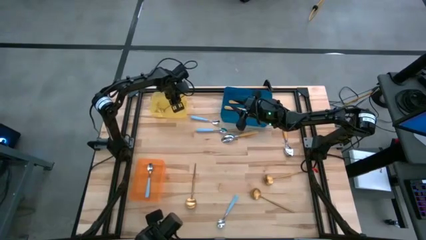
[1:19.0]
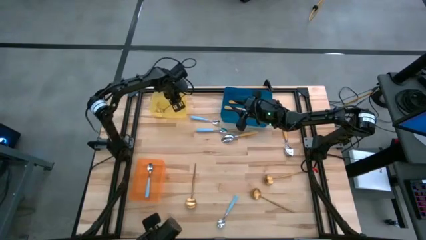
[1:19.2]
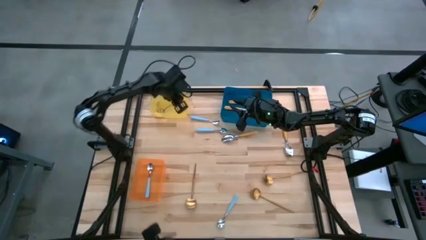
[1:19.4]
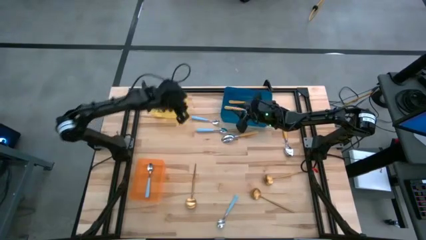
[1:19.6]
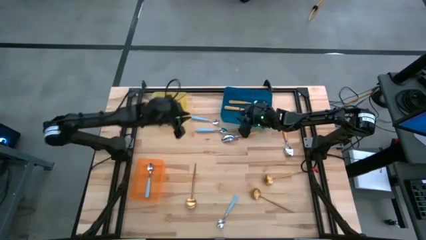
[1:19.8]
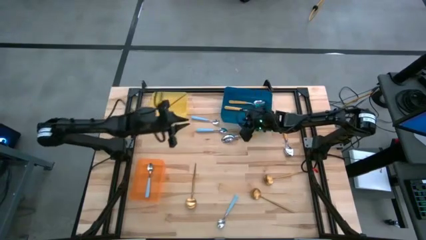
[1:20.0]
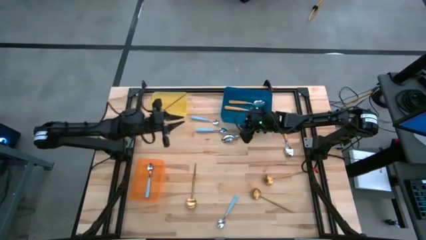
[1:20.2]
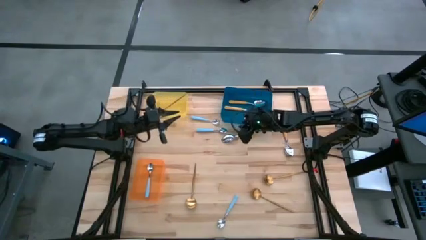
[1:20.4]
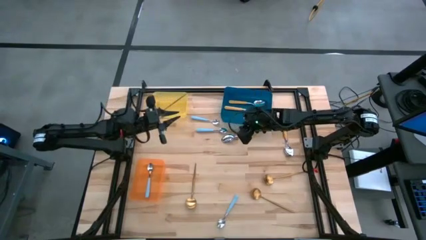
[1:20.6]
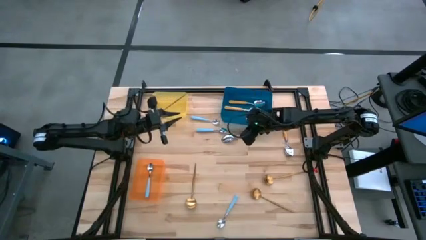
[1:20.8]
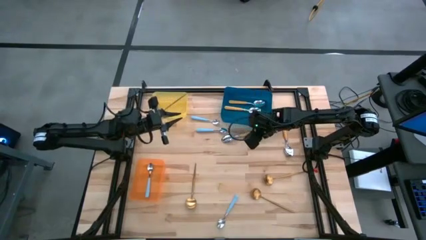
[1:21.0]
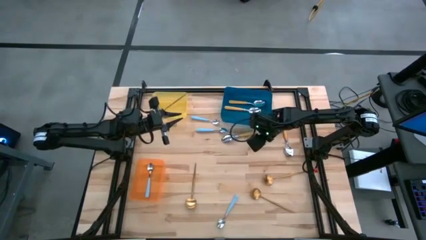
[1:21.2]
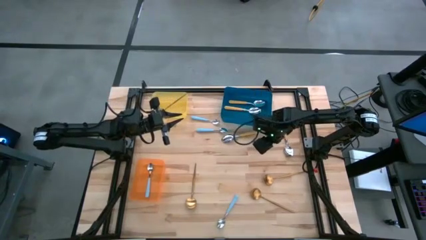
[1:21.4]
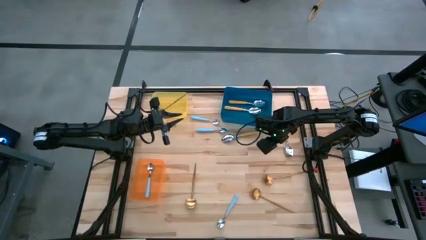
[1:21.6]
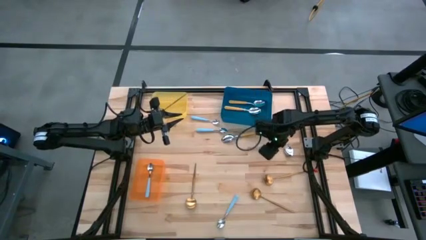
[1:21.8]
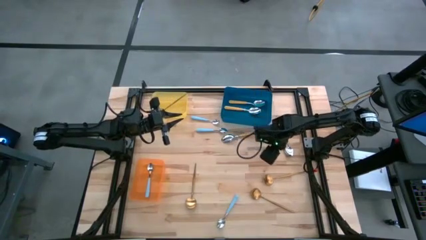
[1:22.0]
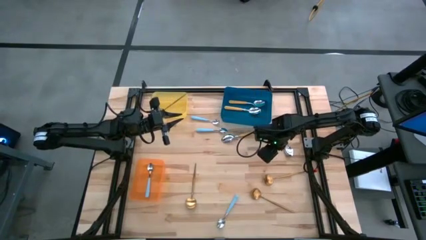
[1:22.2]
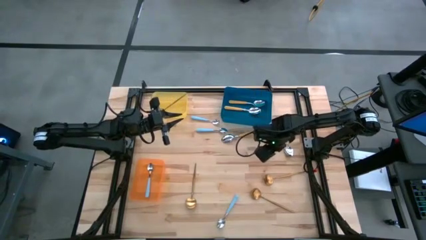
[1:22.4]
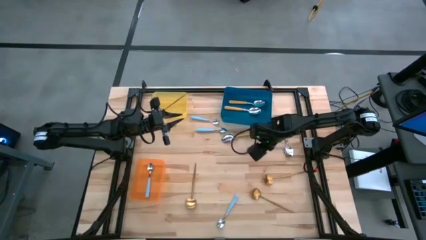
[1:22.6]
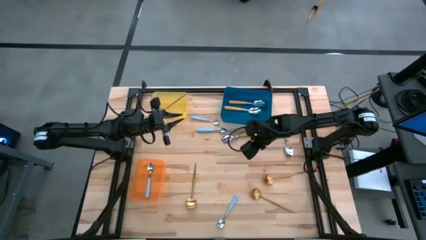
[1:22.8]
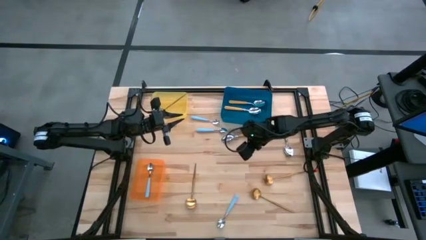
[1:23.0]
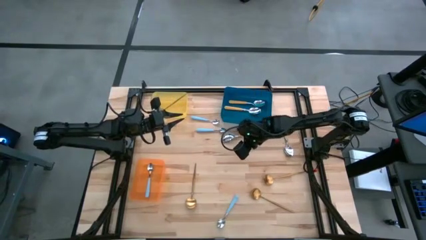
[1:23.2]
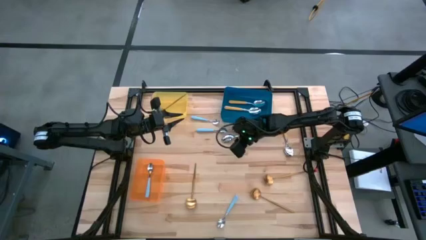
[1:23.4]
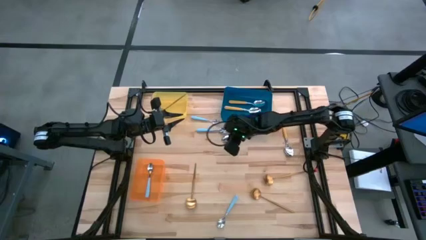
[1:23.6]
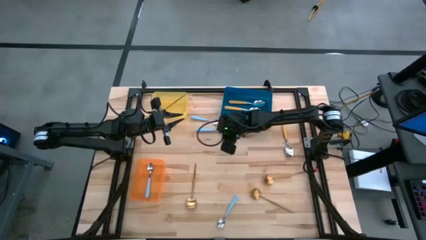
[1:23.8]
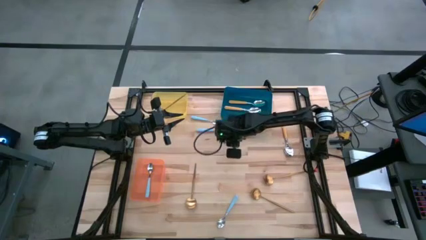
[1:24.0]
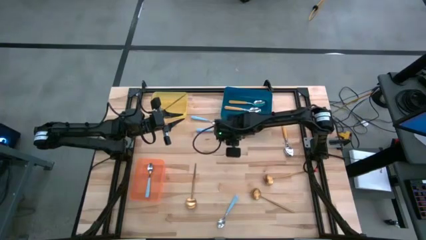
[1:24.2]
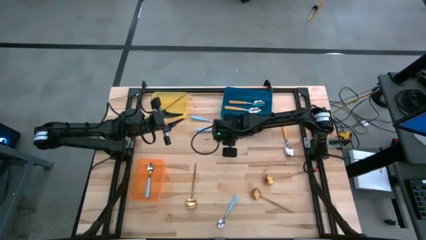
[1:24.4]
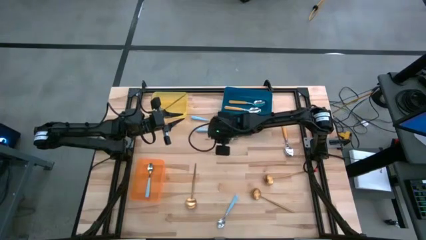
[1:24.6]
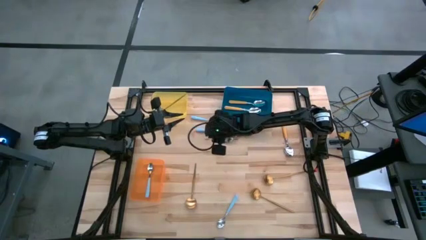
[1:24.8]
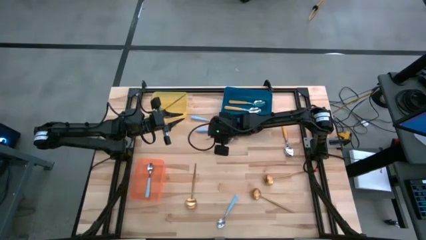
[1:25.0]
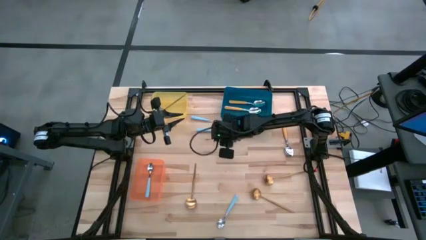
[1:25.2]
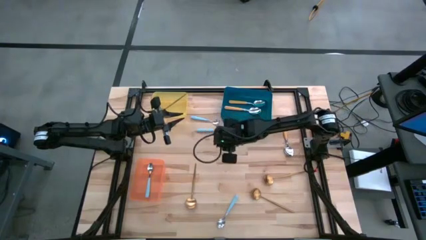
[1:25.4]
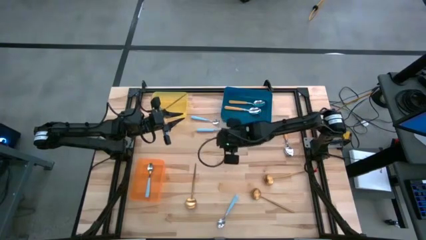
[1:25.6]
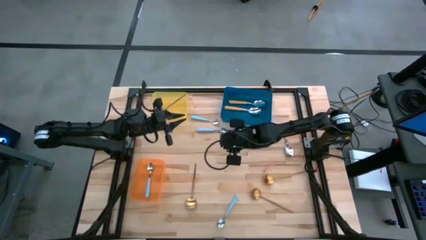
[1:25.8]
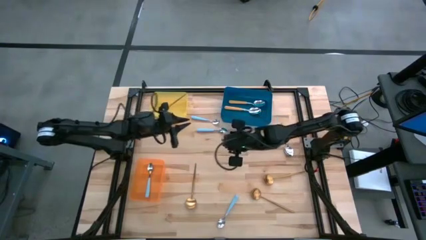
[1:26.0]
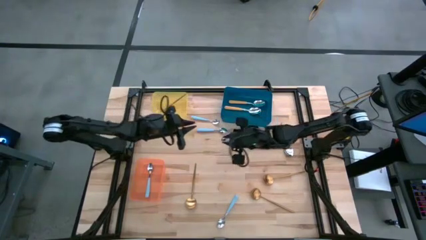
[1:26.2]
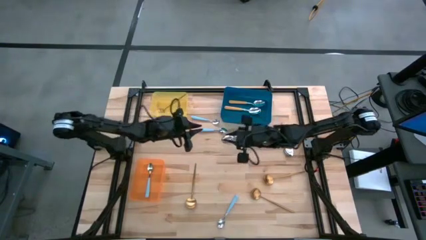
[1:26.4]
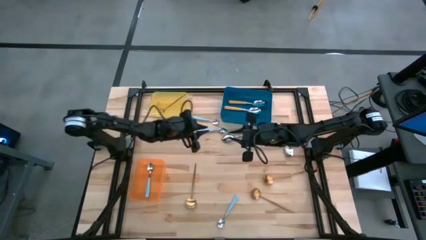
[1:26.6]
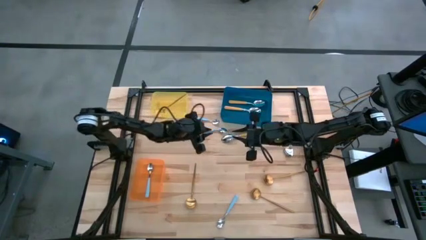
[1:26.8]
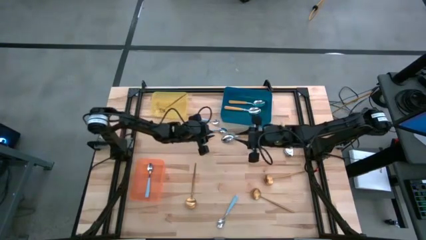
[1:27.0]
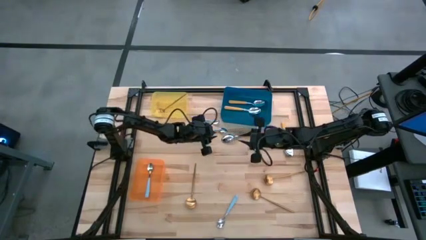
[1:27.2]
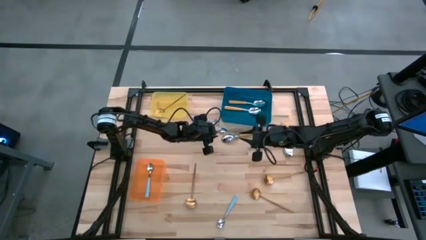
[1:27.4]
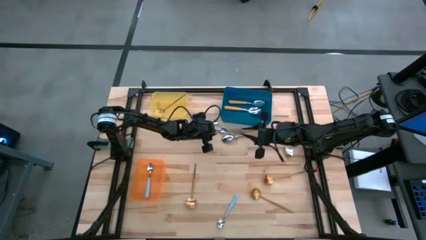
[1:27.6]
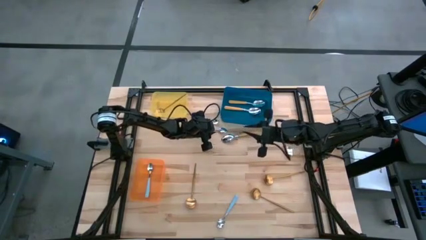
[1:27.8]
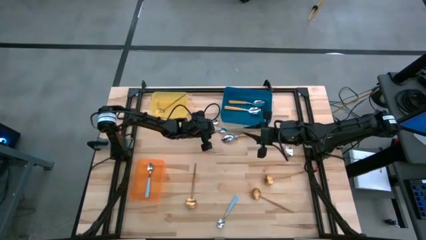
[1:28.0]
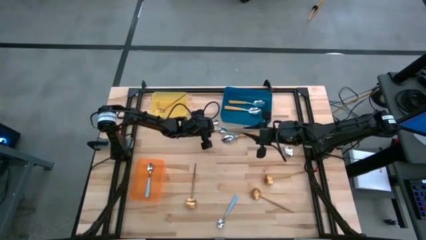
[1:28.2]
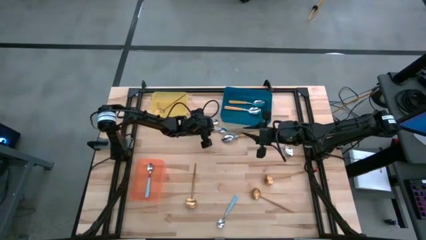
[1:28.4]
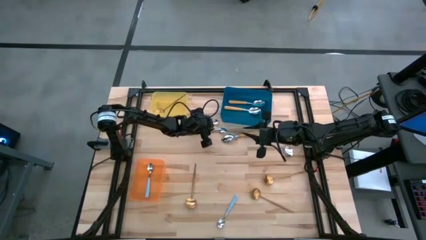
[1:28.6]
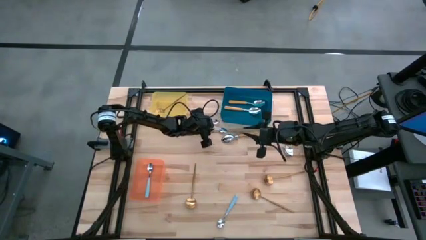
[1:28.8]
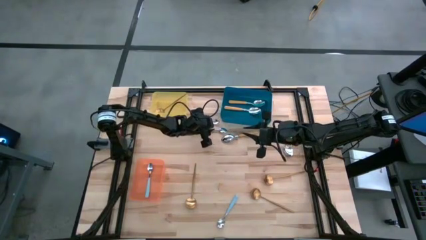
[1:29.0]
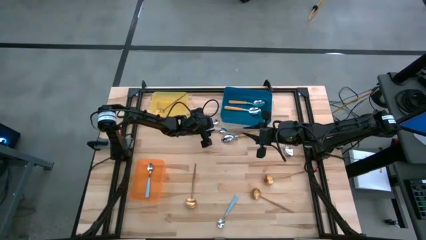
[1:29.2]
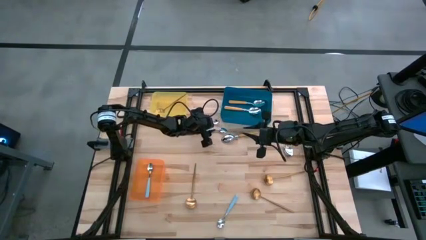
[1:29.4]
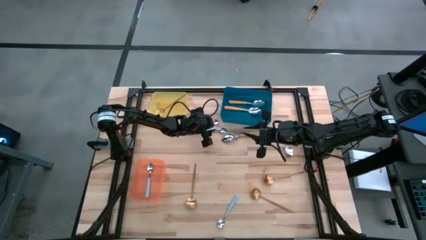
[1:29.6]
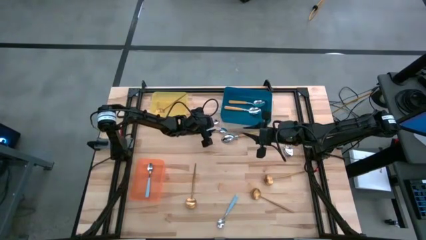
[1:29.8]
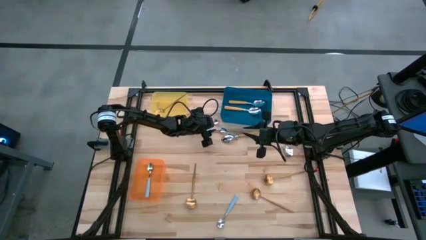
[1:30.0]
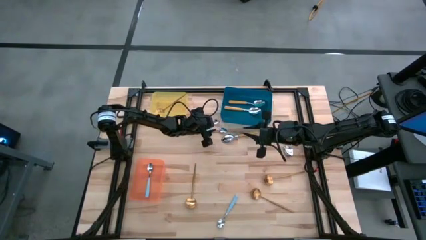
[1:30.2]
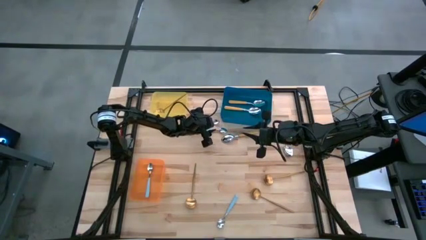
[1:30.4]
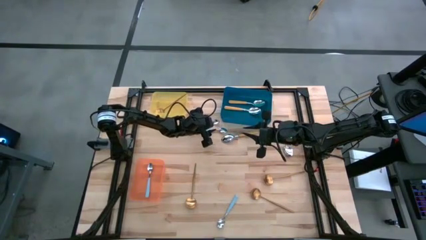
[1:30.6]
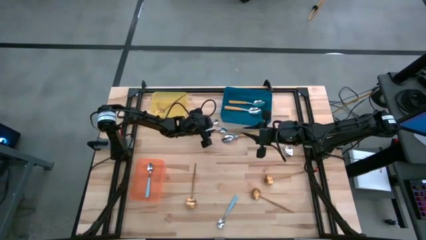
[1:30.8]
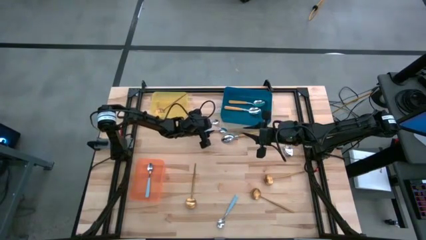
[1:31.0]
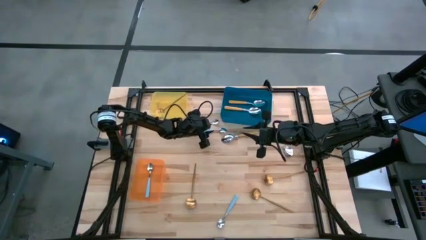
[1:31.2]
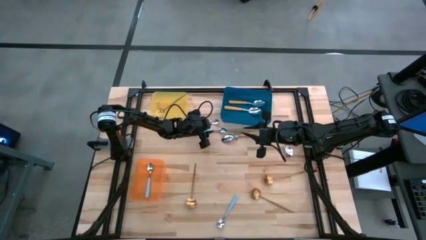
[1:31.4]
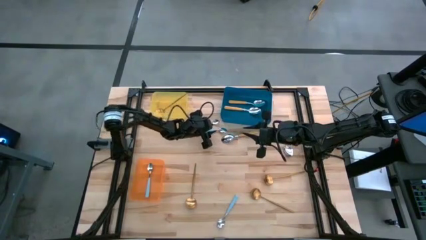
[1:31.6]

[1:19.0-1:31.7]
Task: Sort silverware by color (type)
Put the blue spoon into the orange bin

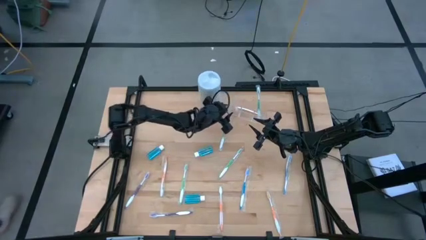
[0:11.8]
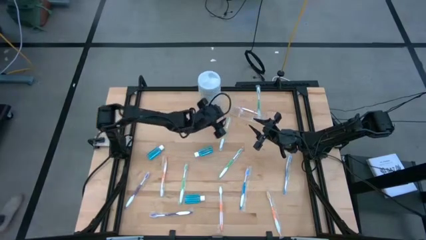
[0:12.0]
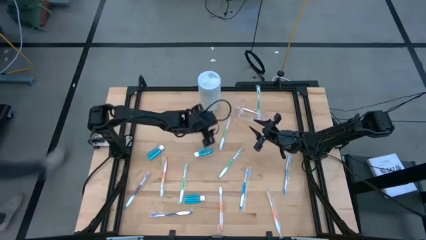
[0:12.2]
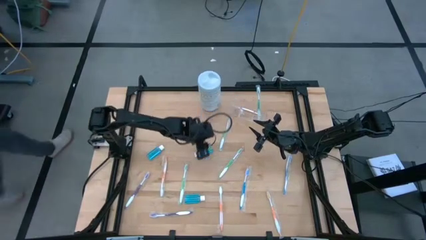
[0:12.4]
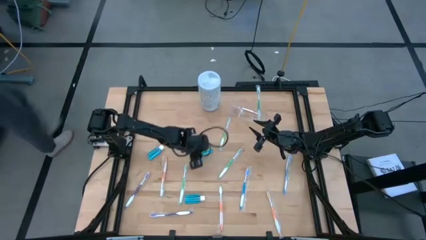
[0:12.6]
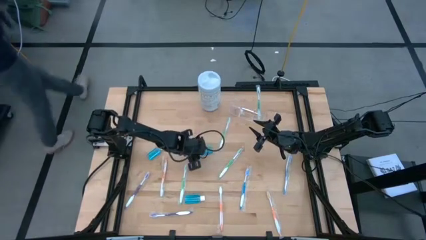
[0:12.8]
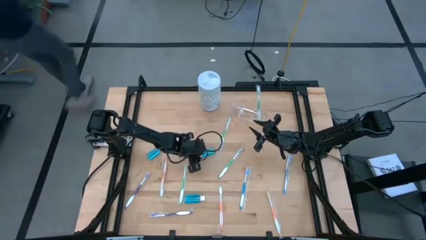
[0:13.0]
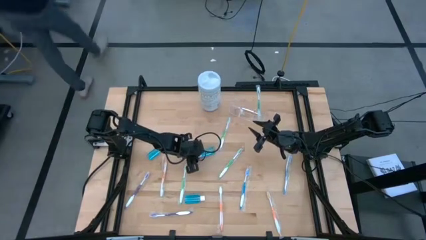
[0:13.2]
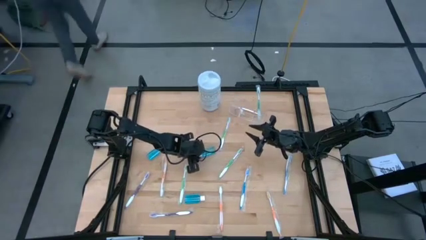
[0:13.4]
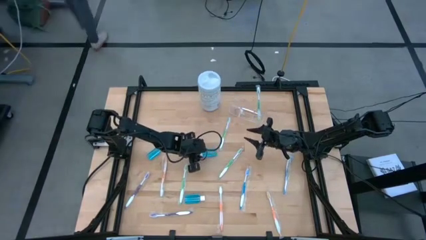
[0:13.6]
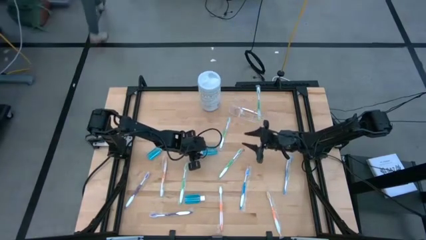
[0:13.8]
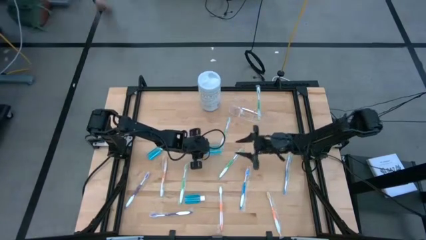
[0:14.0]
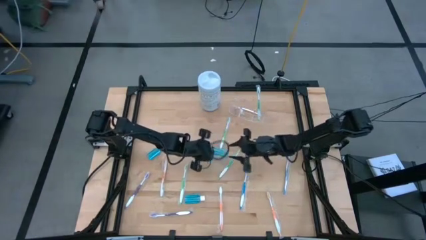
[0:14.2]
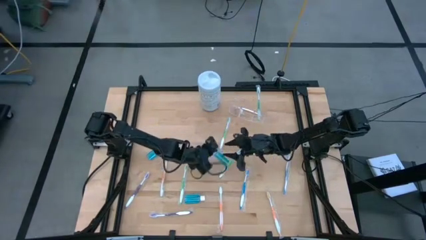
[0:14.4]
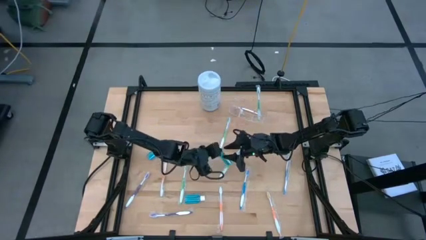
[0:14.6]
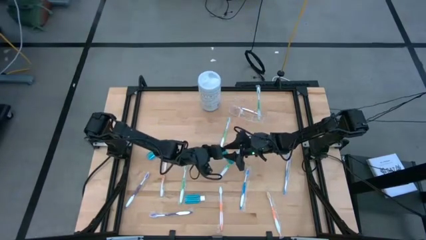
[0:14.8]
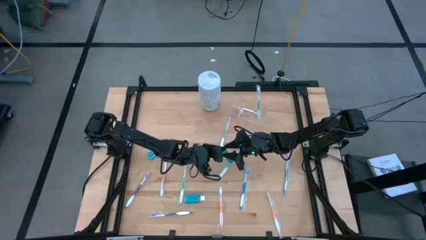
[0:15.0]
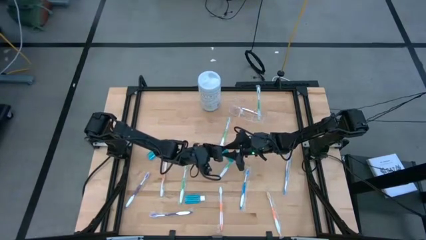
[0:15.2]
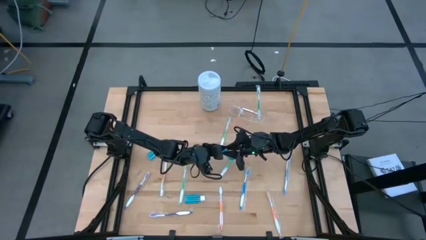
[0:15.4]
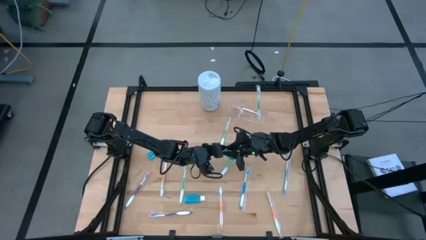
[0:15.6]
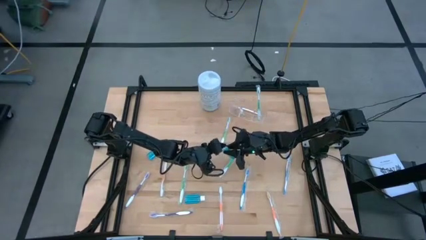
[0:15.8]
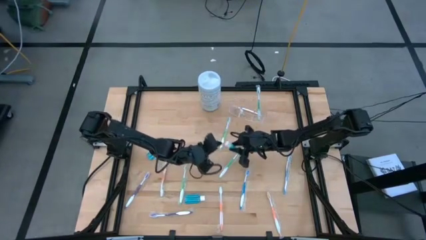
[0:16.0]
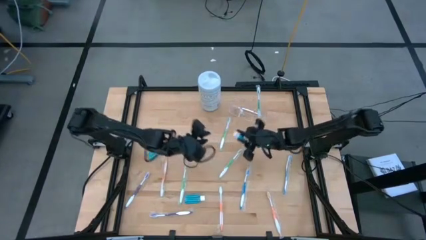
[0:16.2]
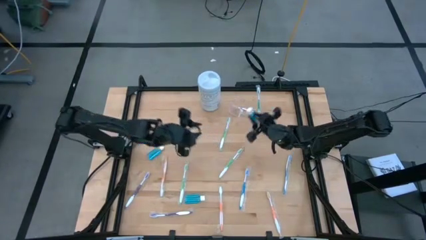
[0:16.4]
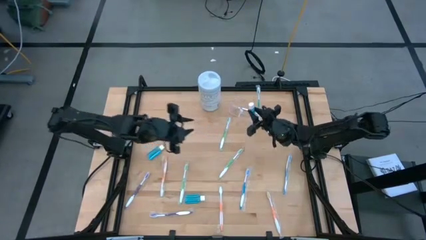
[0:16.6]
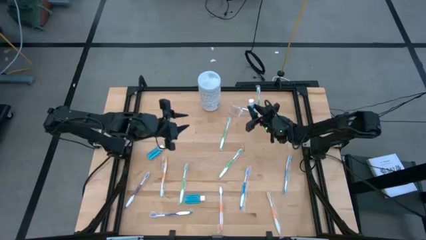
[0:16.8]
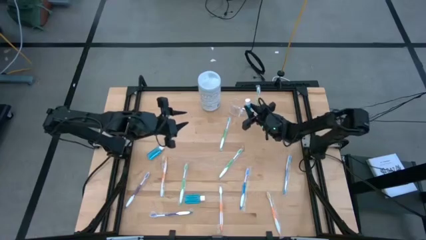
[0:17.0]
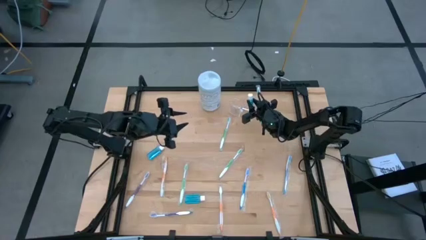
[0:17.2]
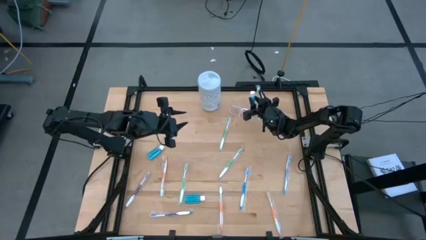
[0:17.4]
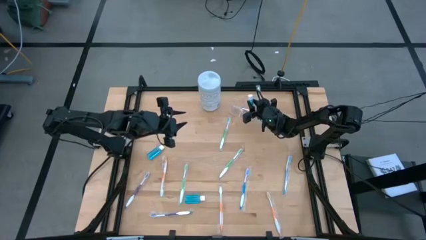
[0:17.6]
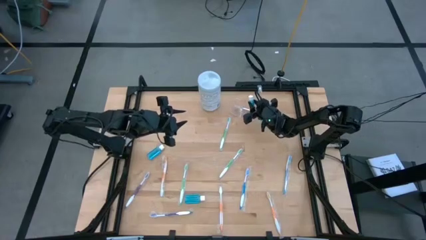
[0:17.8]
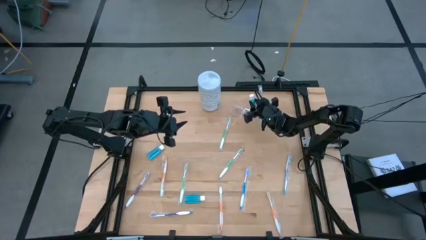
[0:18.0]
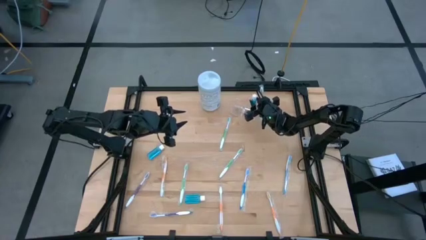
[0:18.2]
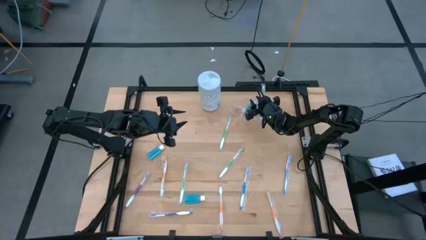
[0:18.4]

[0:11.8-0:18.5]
Task: Pick & Place toothbrushing station
Put the mouthwash into the transparent mesh organizer
